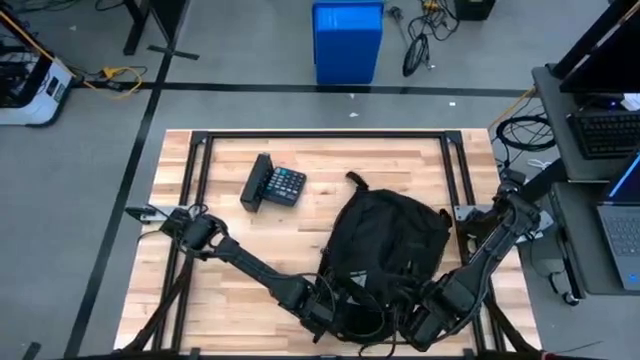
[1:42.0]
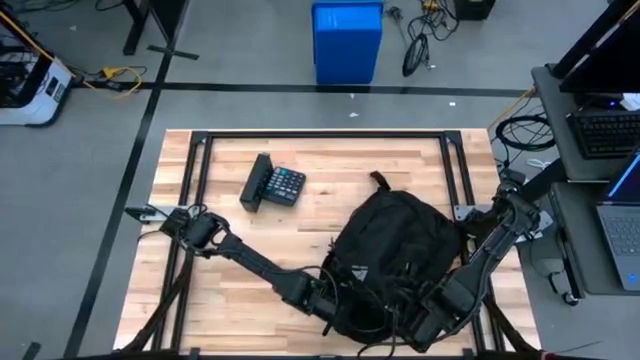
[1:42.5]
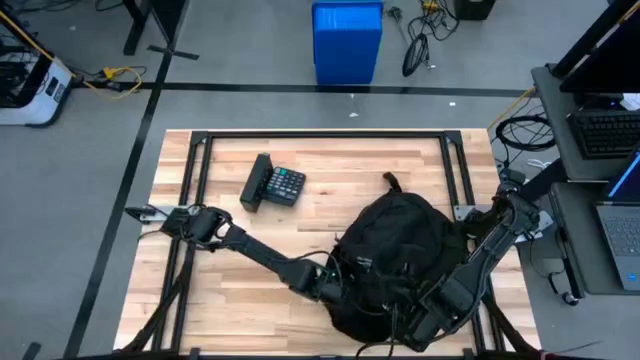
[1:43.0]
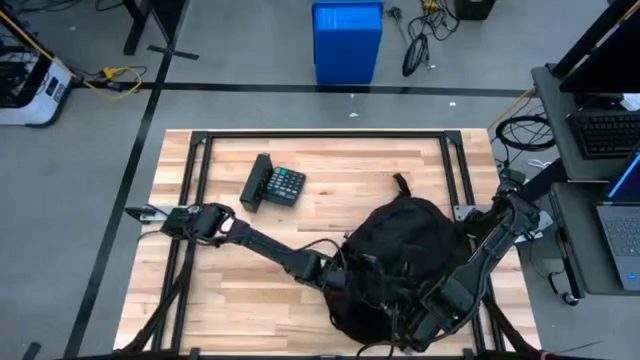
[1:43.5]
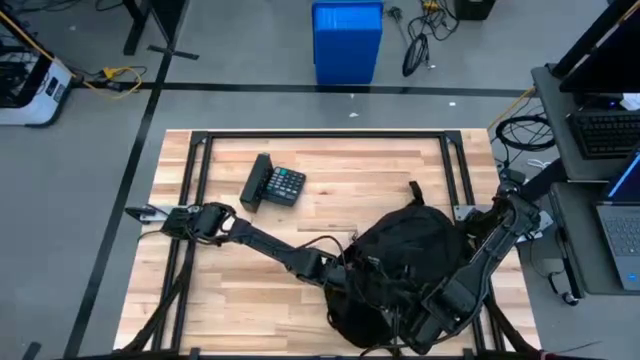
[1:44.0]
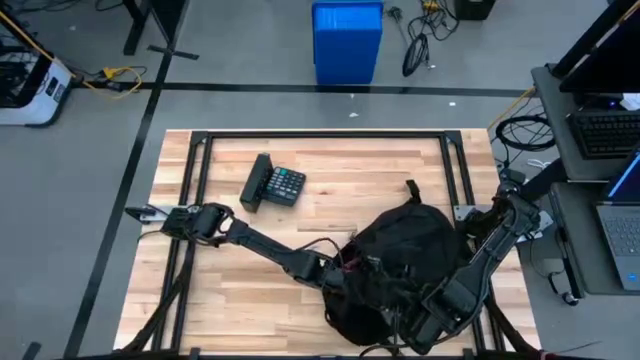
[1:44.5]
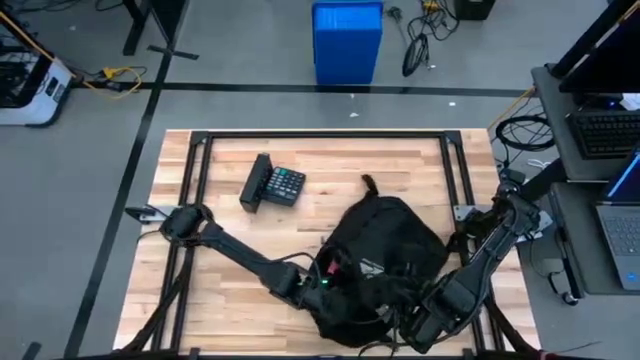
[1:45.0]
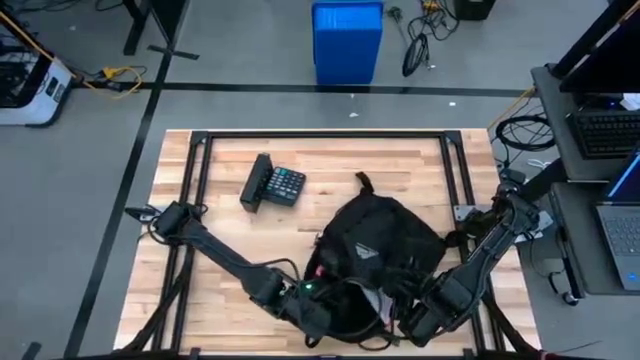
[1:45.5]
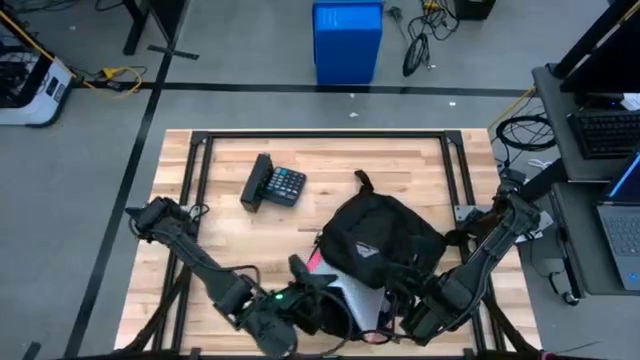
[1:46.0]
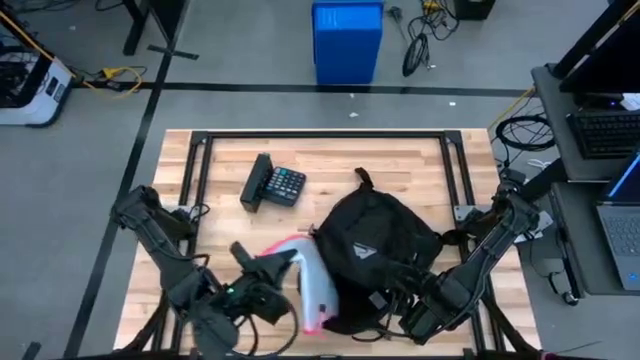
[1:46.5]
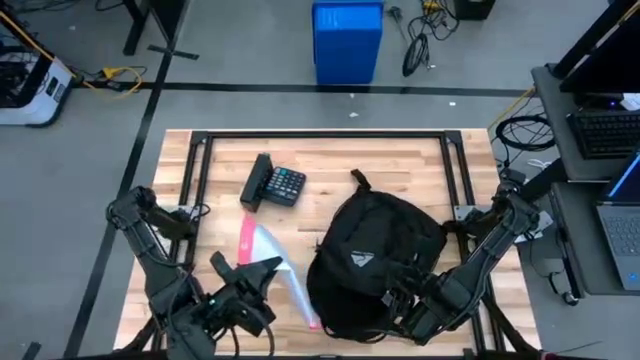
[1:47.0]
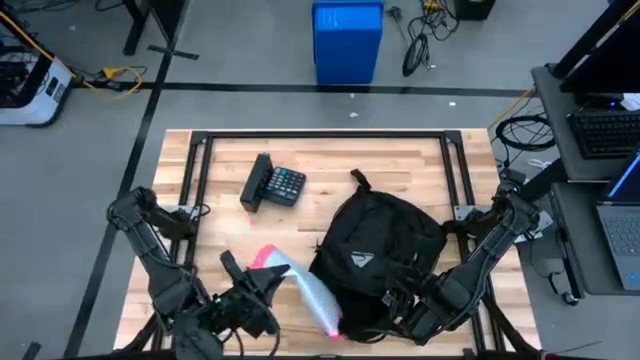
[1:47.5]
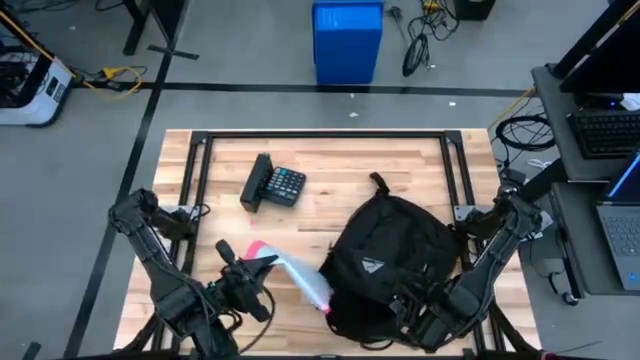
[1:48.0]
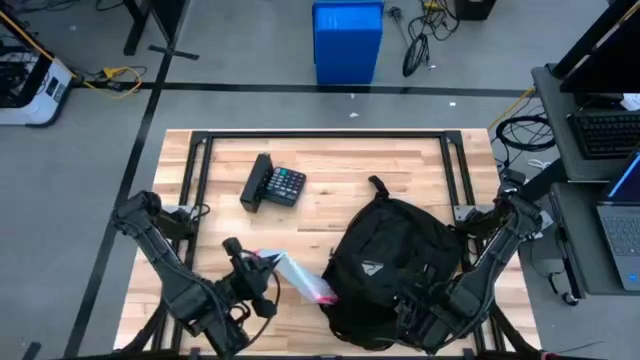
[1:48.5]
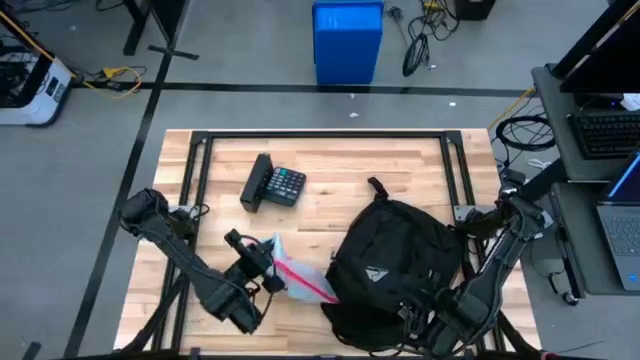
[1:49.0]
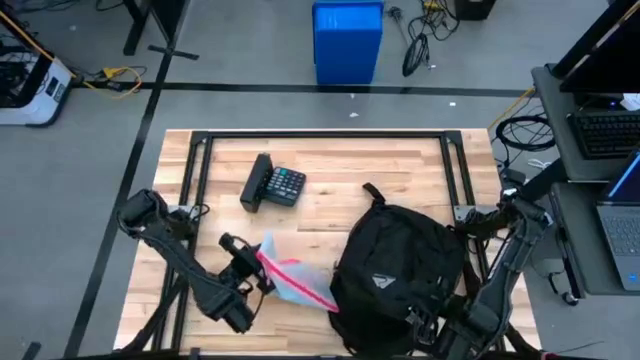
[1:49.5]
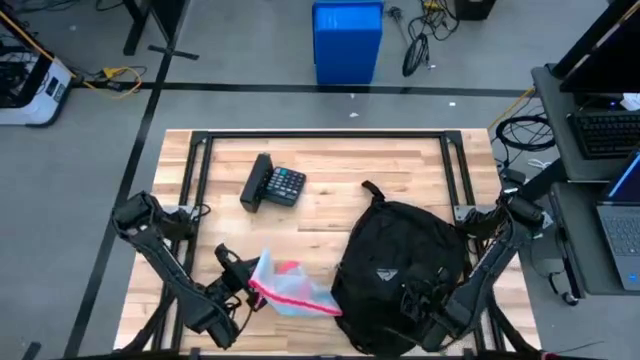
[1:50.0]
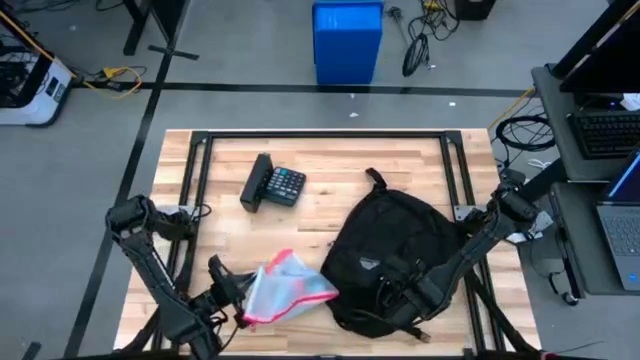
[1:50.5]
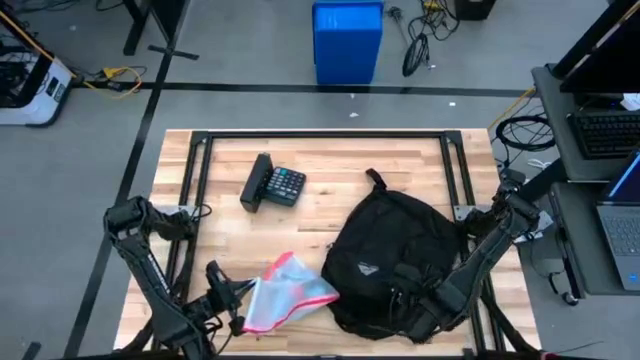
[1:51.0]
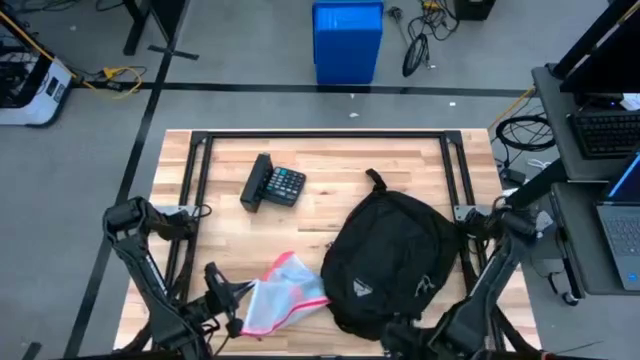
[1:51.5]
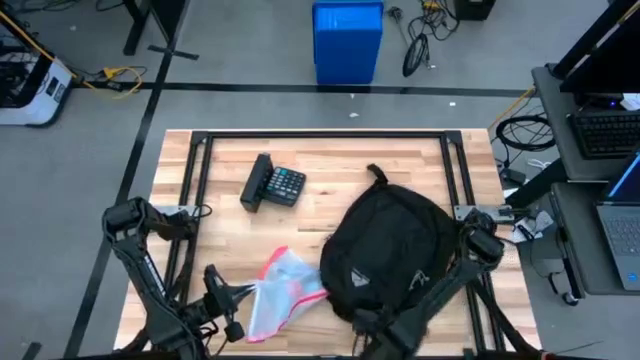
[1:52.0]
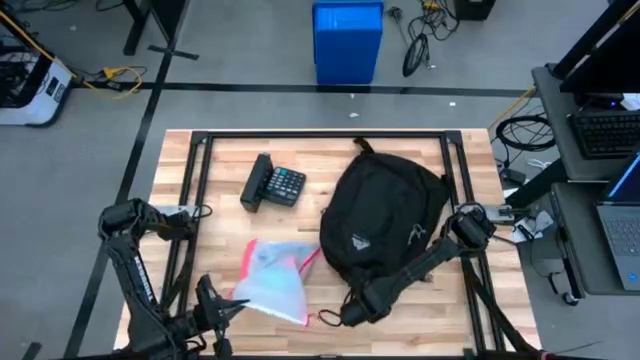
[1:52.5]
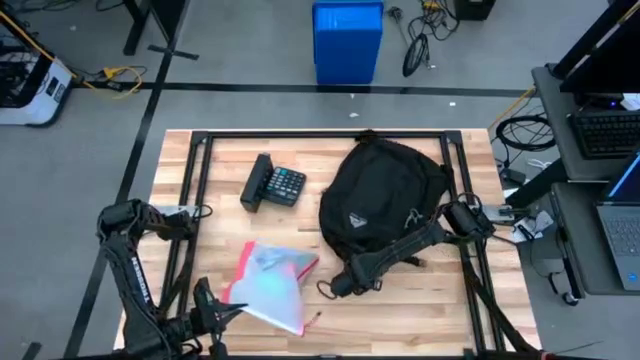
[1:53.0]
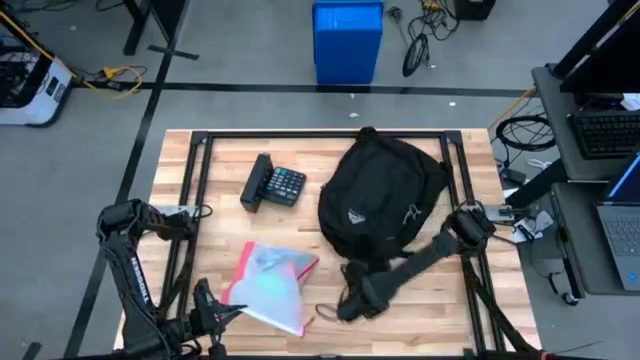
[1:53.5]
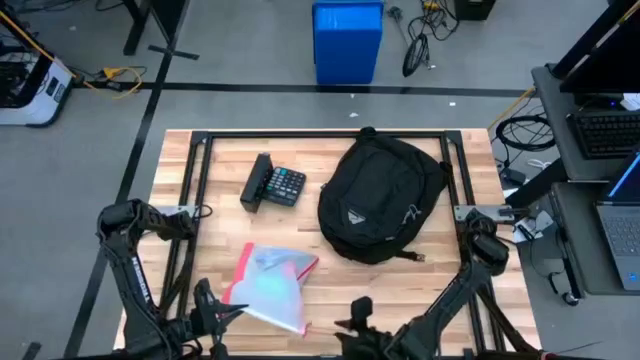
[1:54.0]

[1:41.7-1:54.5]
Task: Unpack backpack
Remove the white zip bag from the black backpack

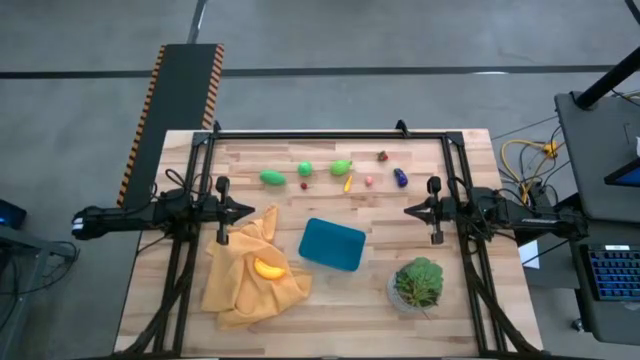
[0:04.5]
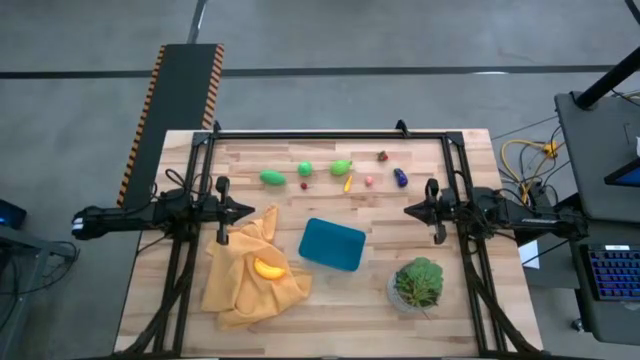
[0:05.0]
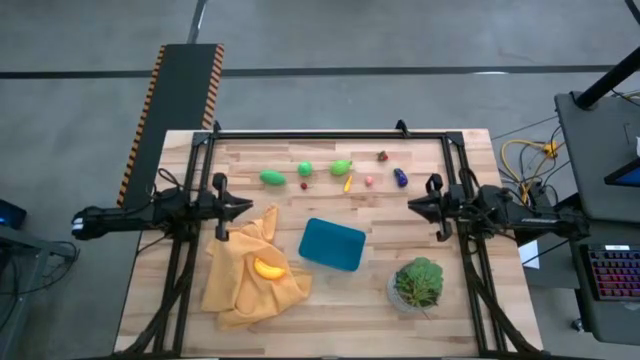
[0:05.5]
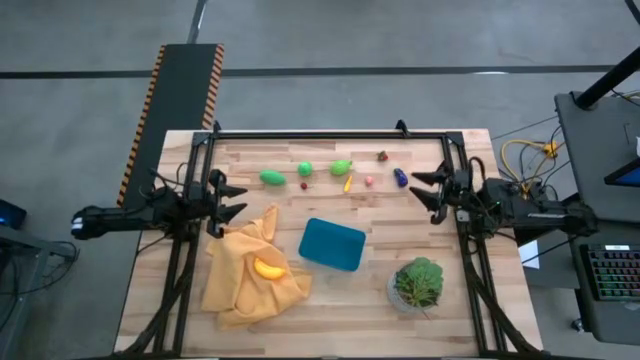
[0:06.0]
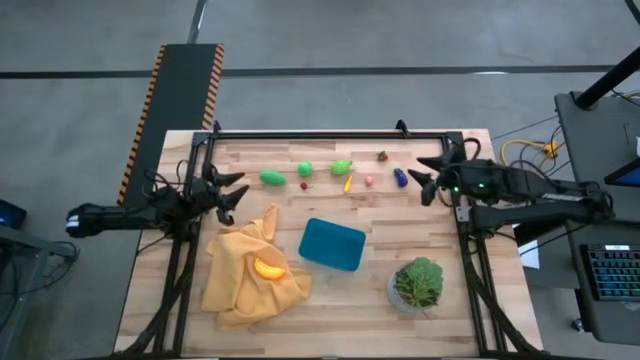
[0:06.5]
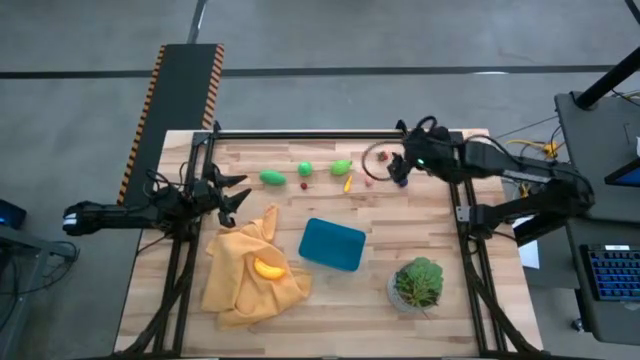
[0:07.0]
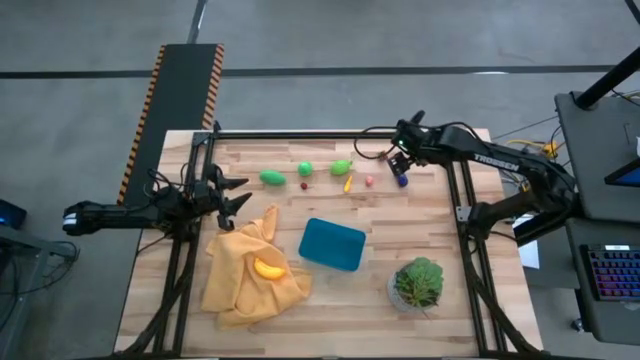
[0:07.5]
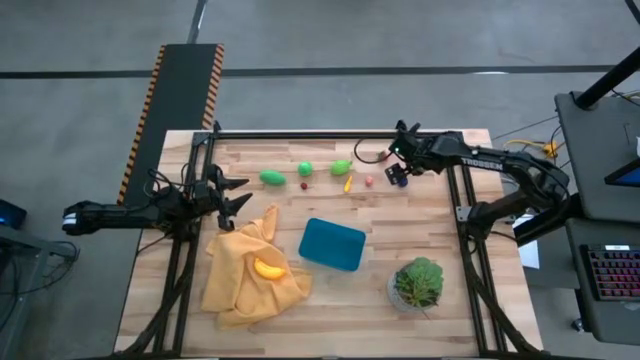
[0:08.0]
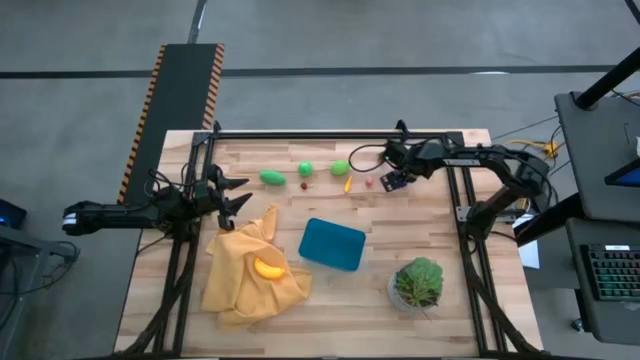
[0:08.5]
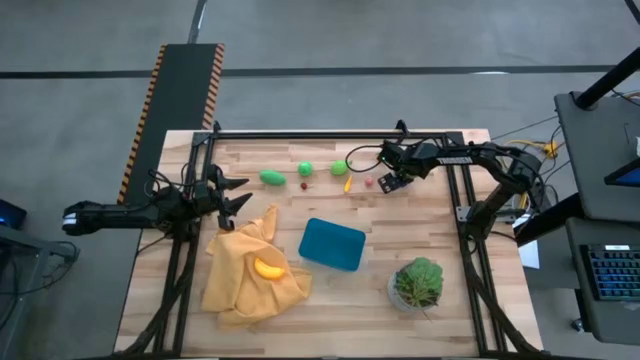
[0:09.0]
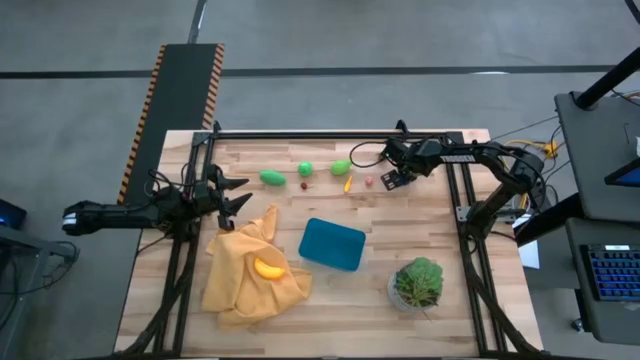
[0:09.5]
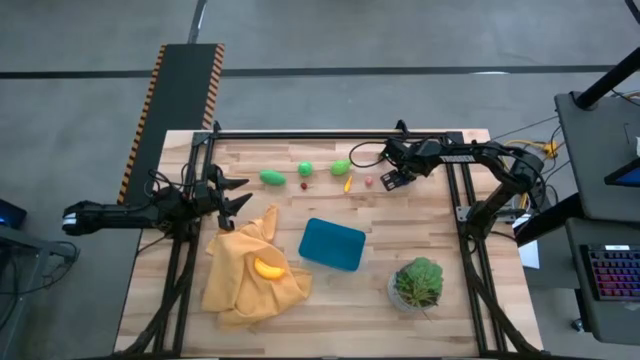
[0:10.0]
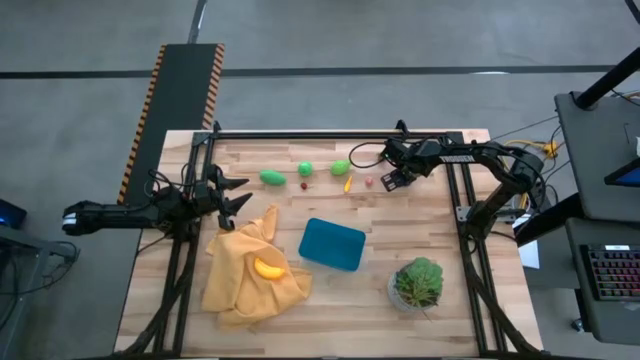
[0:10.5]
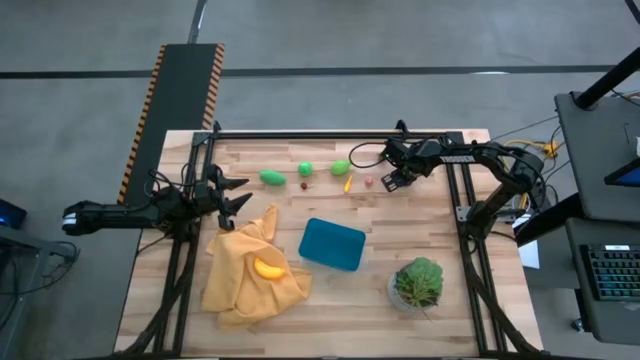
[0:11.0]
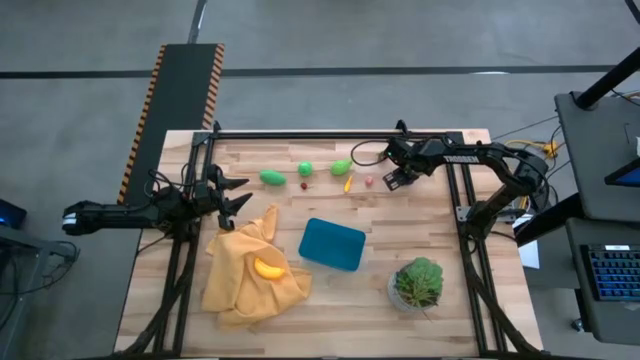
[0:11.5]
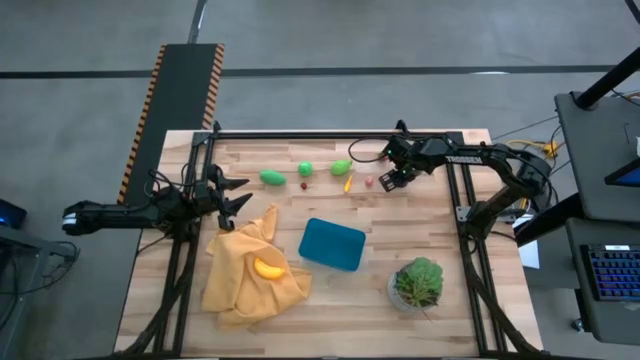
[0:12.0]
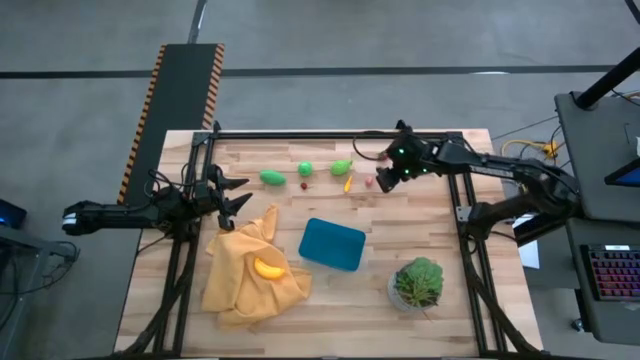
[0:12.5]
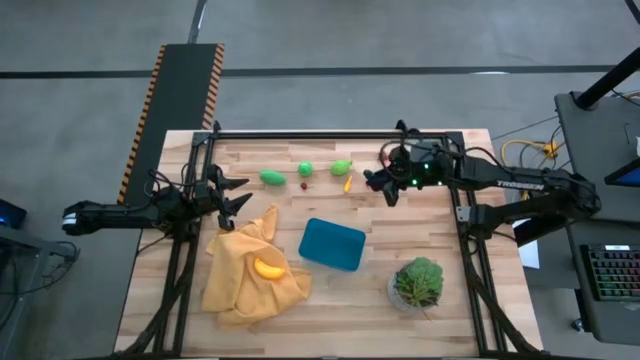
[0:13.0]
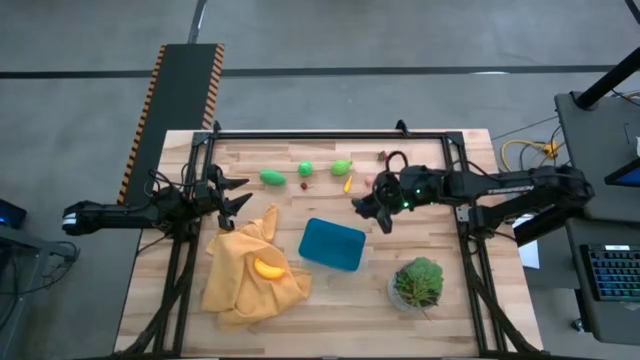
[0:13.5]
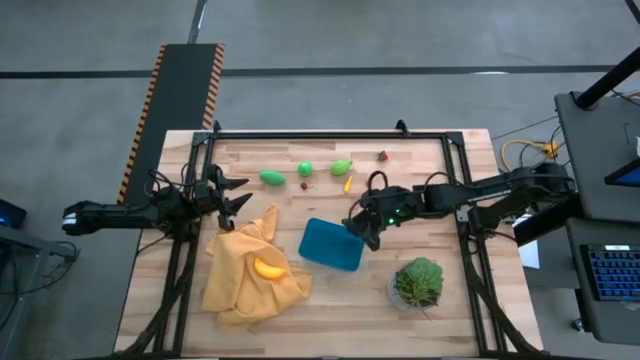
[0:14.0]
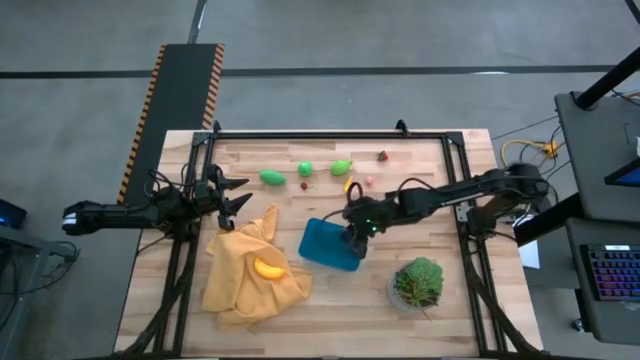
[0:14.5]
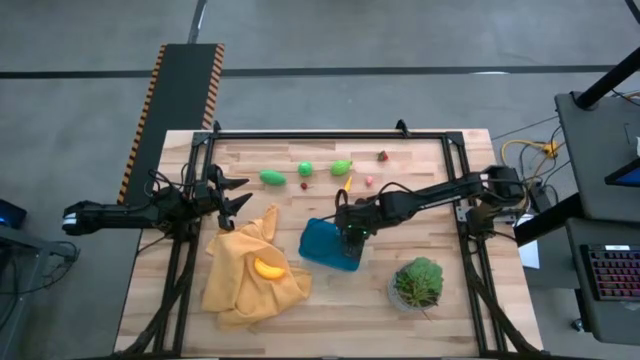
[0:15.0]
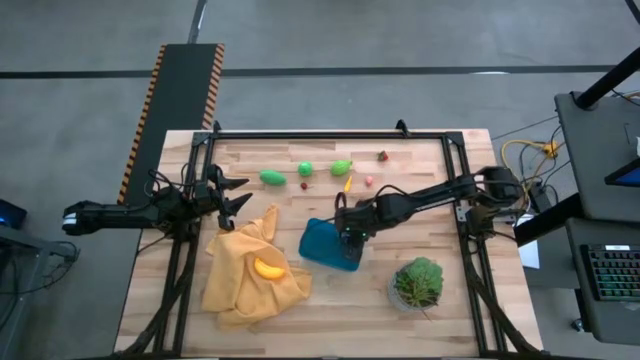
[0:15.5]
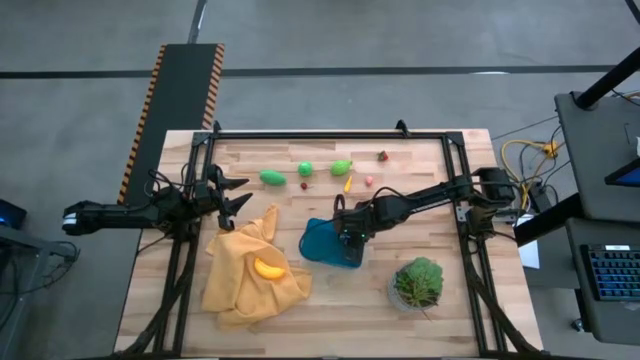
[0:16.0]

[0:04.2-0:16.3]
Task: Pick and placing Produce into tupperware
Put the eggplant into the blue bin
